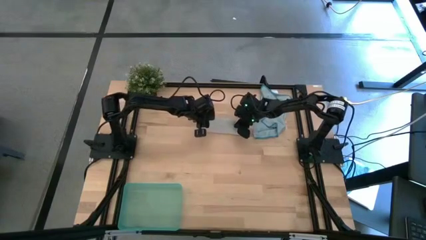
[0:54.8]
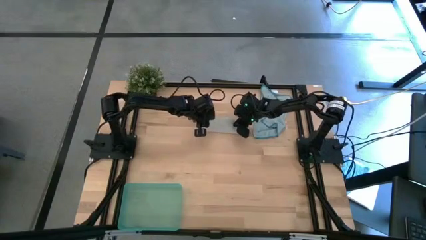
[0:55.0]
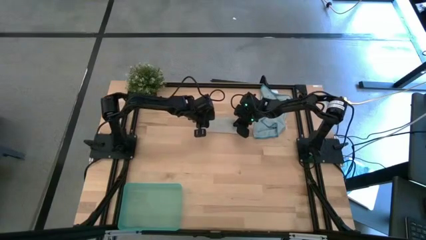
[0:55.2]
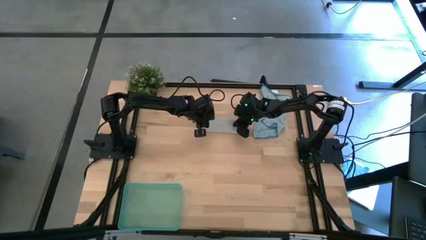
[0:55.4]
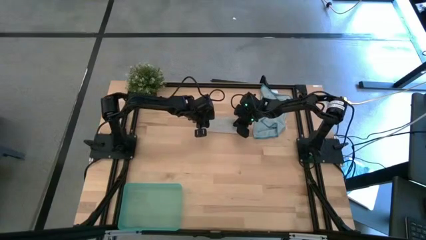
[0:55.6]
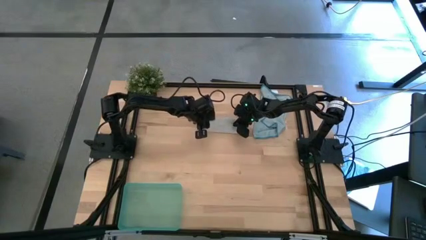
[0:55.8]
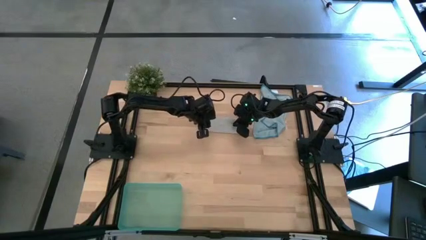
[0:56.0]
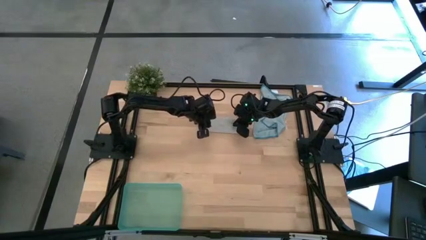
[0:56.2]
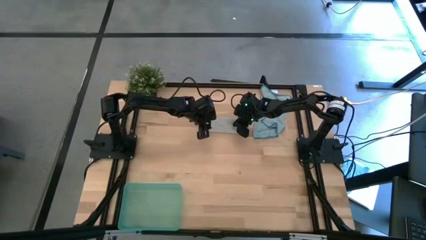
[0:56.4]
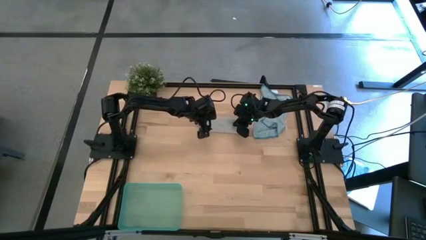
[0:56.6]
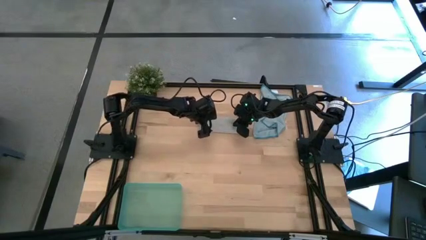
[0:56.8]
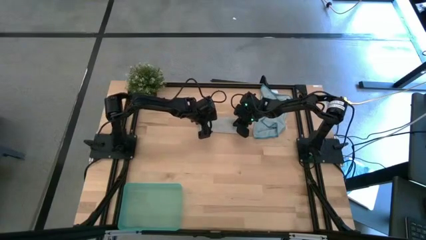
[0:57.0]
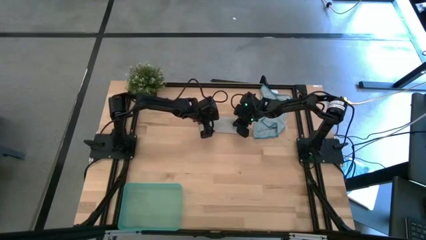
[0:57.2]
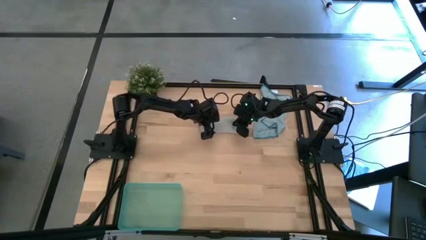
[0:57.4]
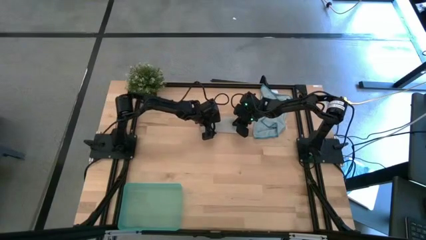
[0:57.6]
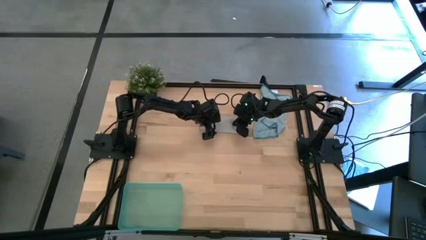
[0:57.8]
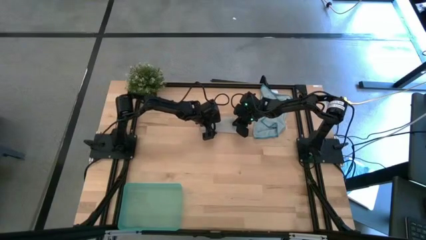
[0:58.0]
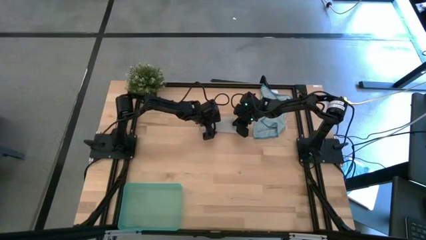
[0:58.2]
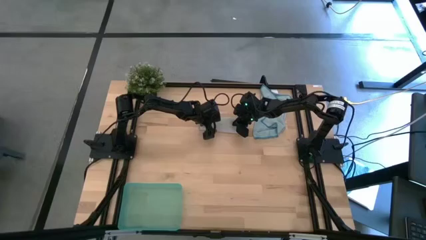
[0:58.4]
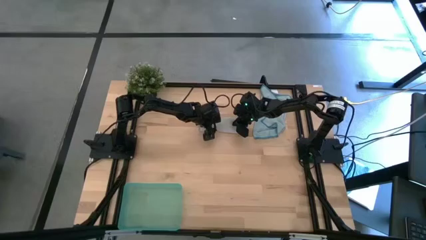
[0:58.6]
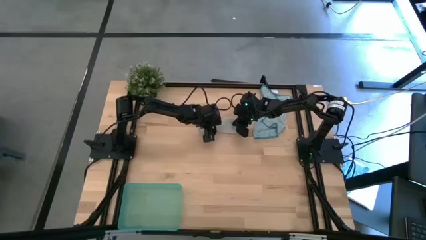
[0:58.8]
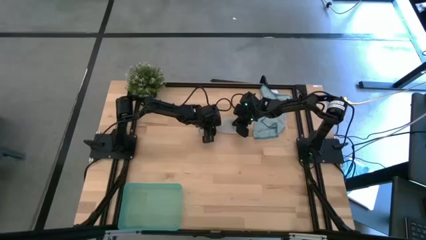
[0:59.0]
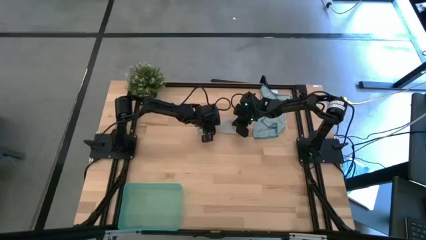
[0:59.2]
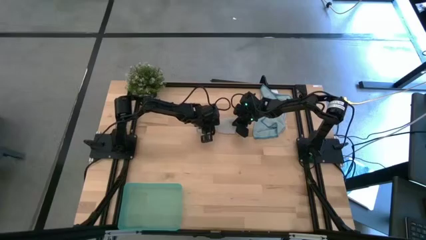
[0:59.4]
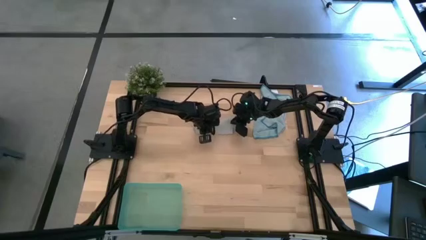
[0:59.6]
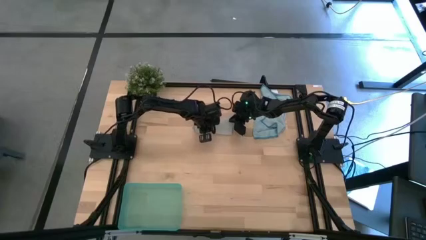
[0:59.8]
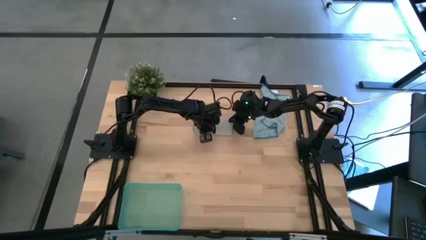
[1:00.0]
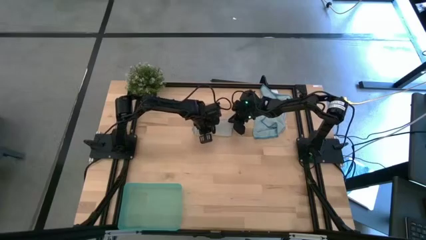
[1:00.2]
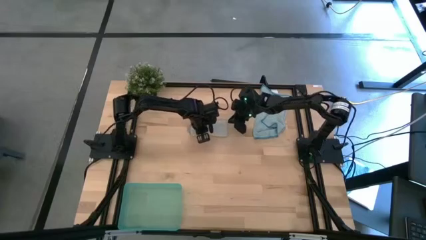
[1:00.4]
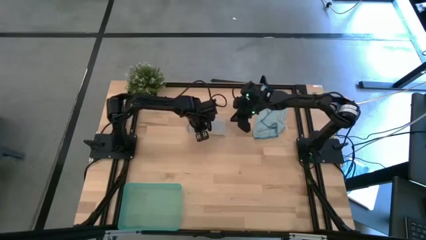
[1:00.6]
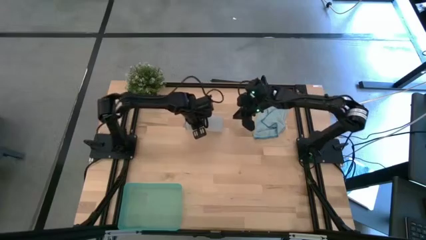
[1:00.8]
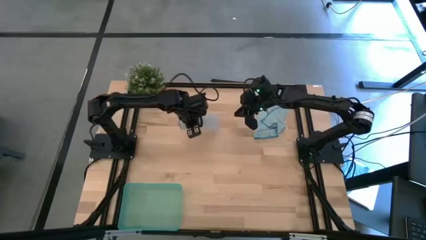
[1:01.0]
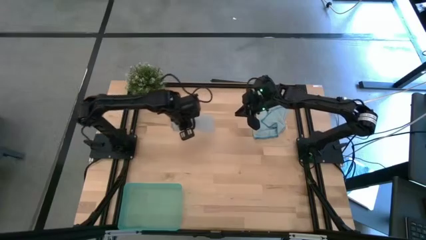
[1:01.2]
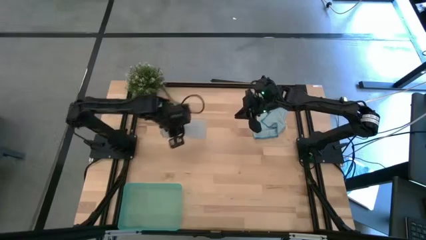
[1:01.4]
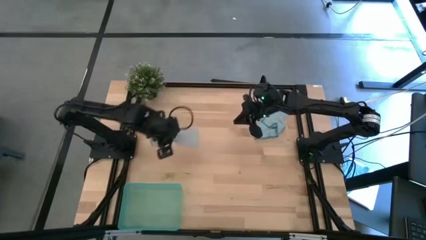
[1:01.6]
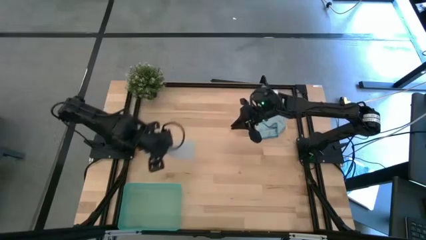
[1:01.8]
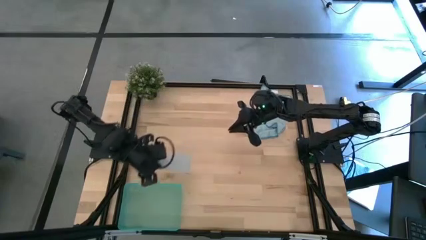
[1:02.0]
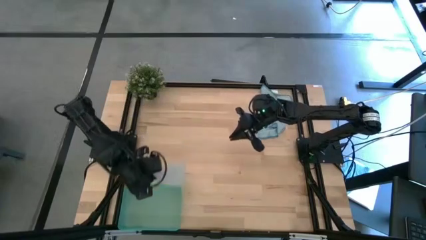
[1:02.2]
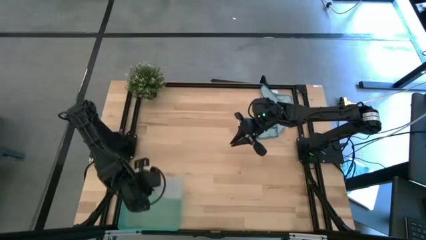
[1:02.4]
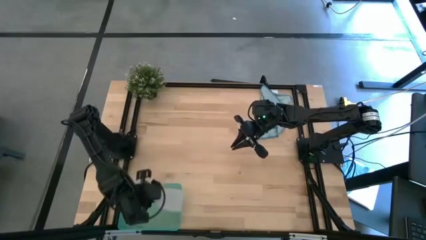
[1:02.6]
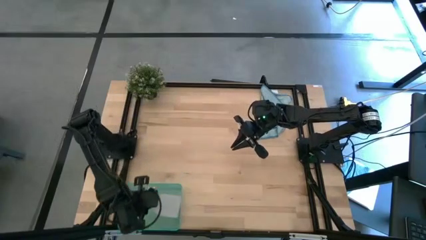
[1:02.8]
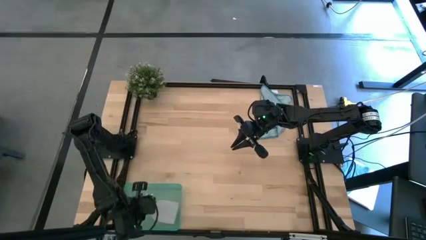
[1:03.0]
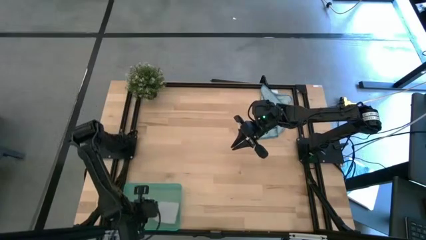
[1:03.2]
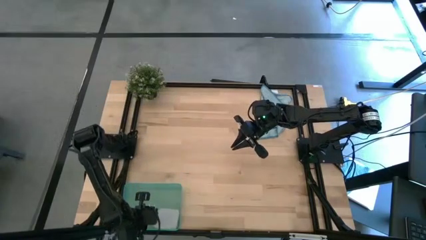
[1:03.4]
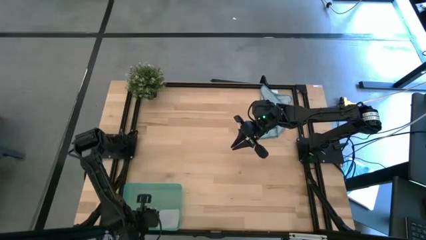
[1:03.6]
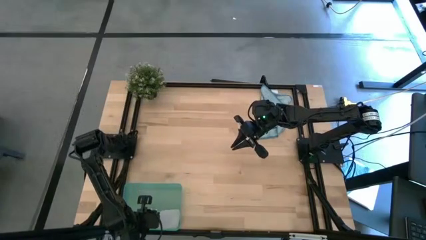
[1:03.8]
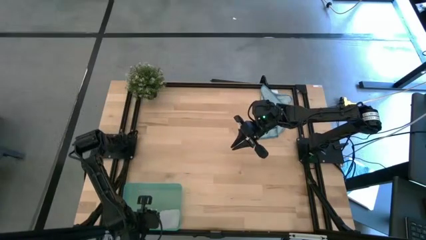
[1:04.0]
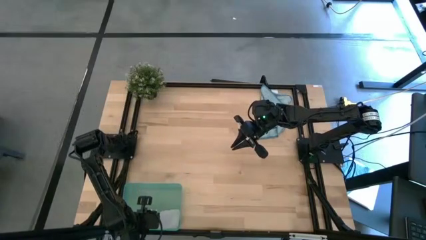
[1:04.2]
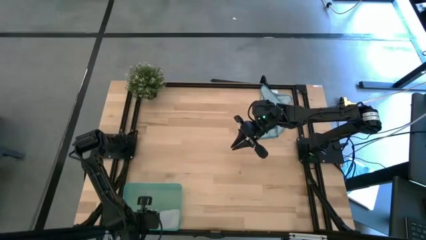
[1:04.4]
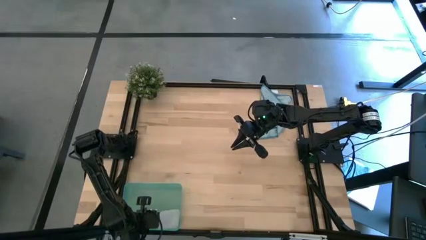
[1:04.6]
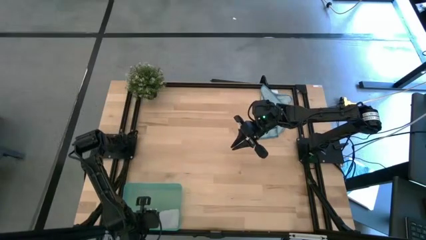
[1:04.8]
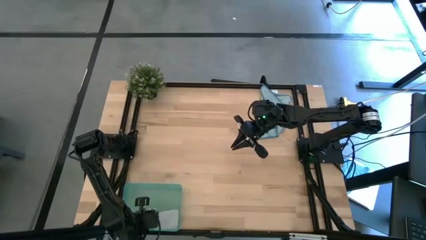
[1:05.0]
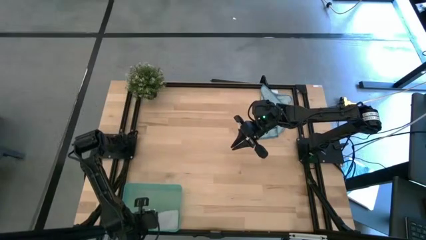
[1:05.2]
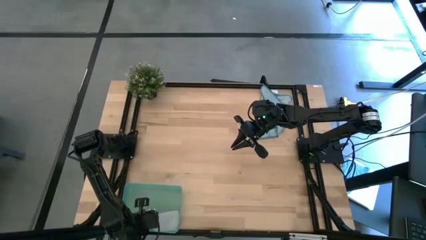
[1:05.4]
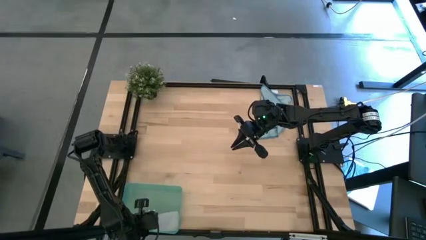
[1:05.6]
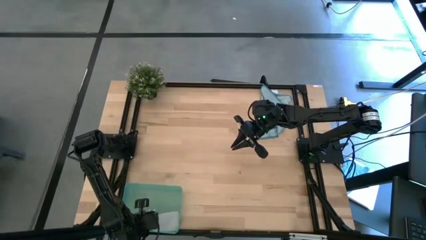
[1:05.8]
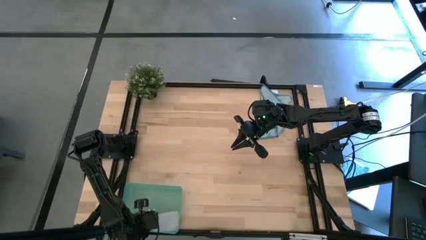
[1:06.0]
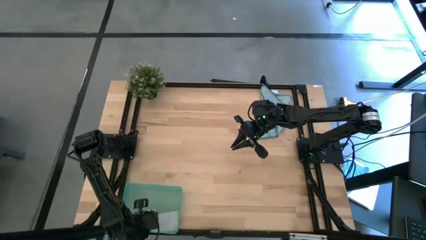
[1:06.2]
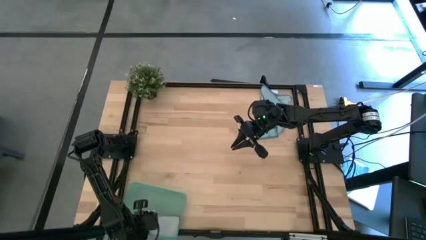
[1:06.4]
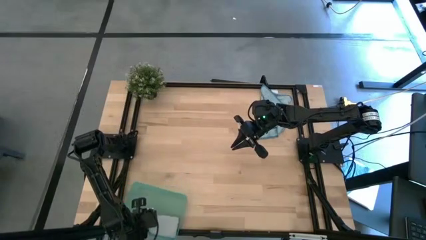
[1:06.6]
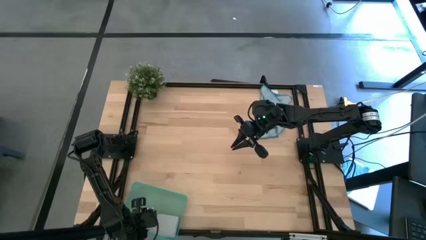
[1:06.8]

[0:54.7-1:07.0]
Task: Roll microfiber towels into tight, uniform cylinder then place into a basket
Put the gray rolled microfiber cloth into the green bin

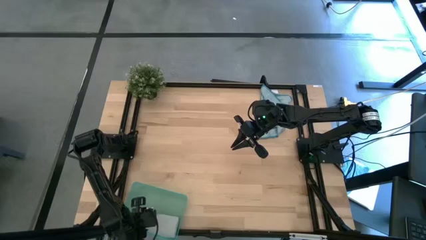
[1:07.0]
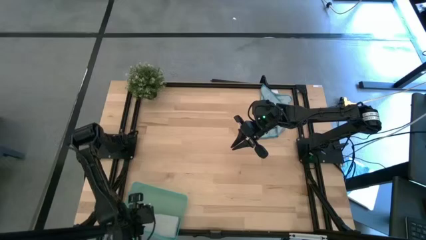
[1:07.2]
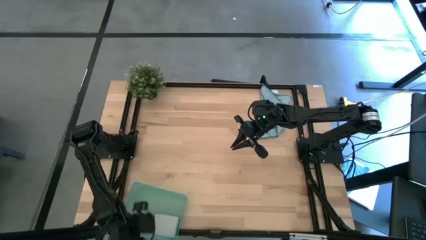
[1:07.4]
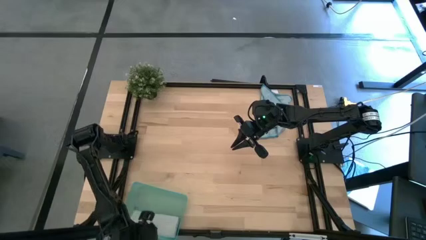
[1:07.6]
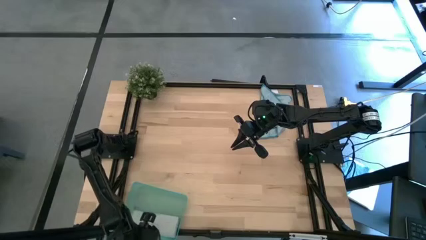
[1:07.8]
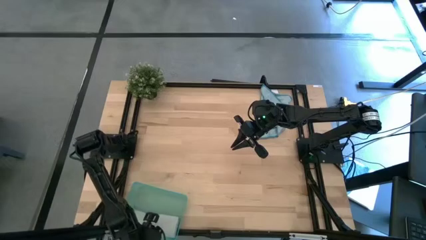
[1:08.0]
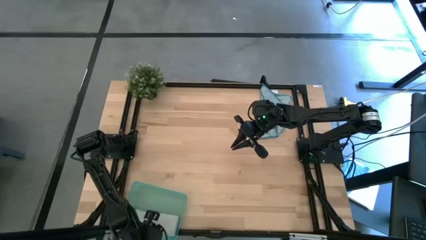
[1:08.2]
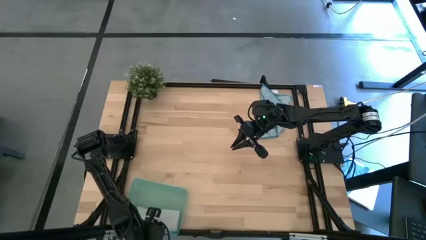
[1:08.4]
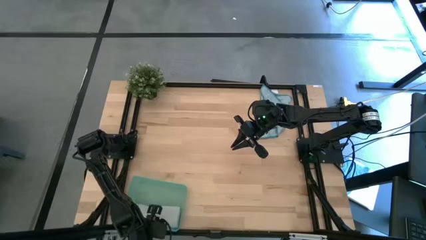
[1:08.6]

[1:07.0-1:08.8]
Adjust the green bin
